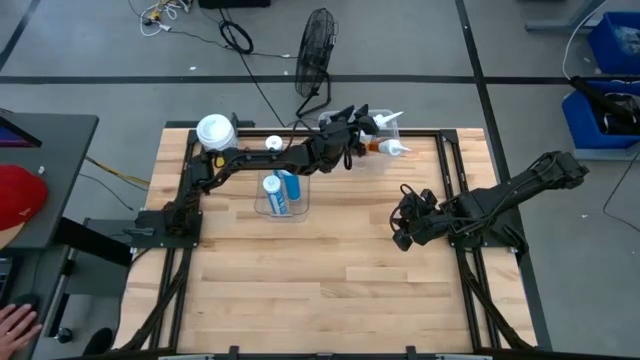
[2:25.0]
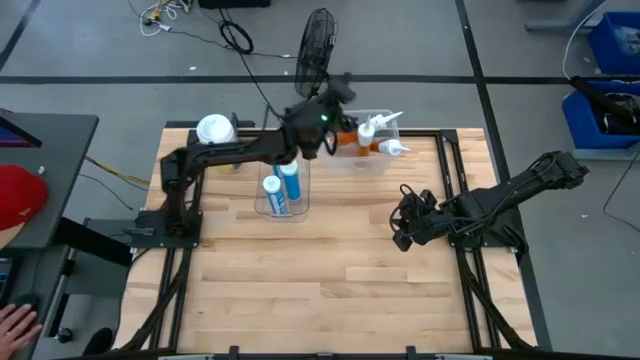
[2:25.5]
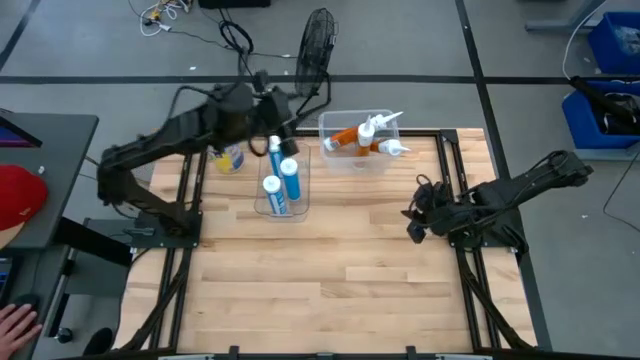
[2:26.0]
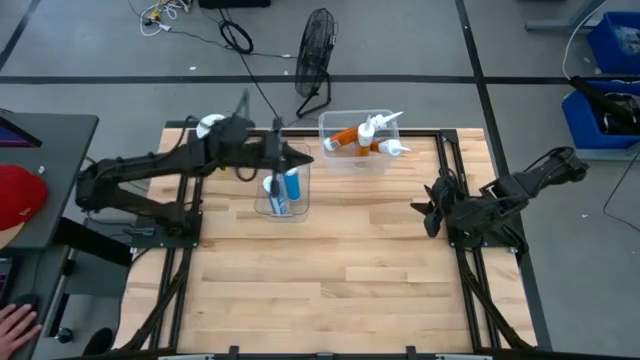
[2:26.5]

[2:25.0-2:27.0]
Task: Pick & place silicon tubes, Sealant and Lysol wipes
Return to Home Position

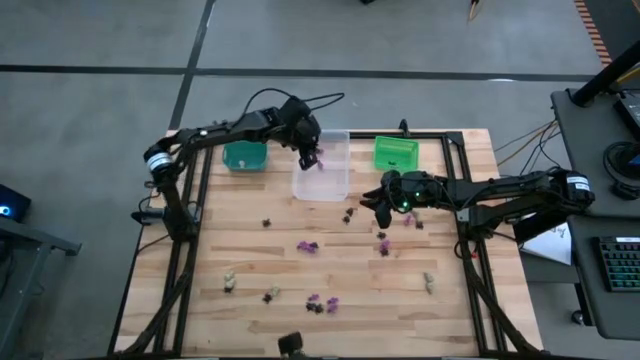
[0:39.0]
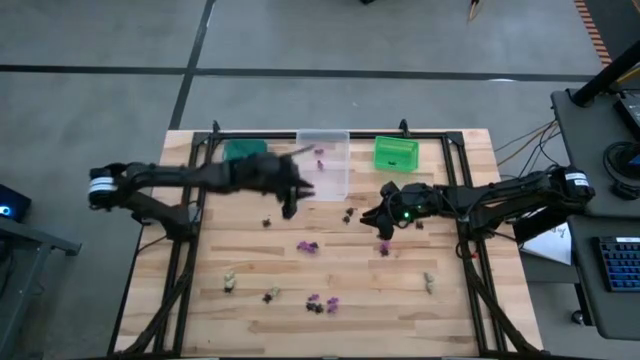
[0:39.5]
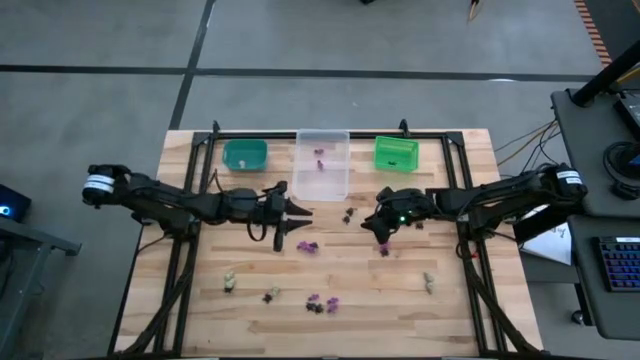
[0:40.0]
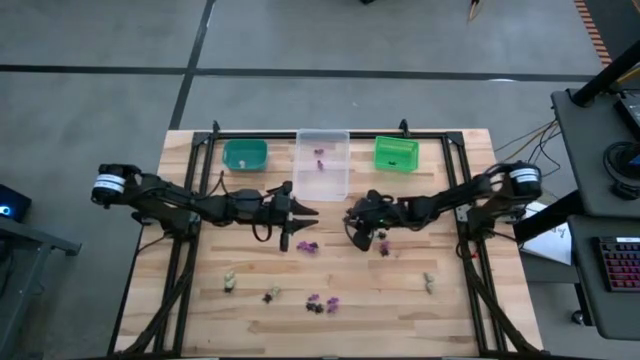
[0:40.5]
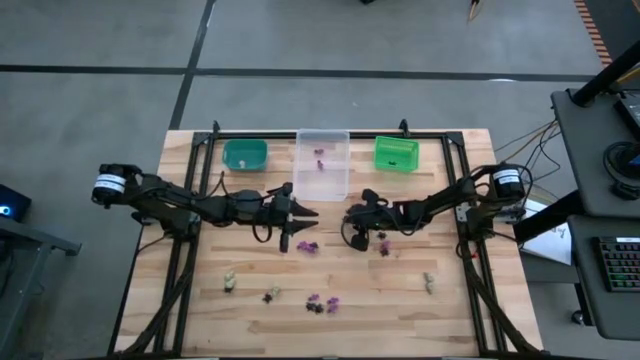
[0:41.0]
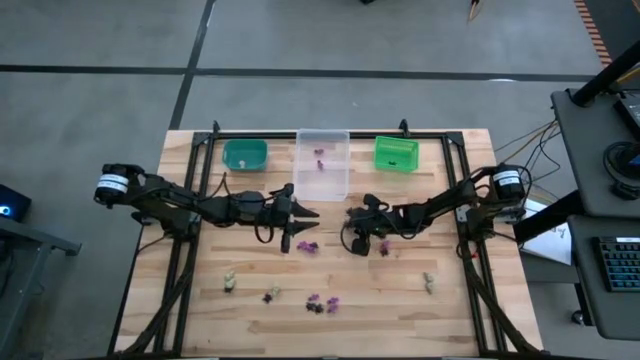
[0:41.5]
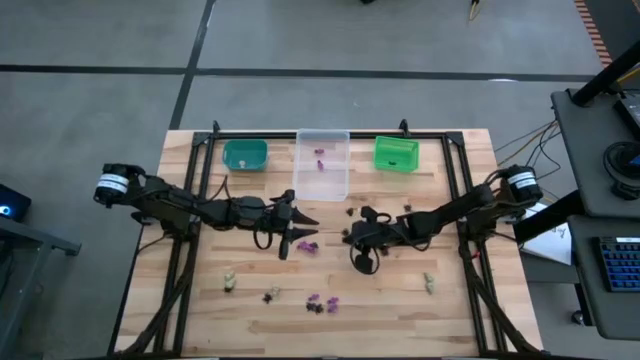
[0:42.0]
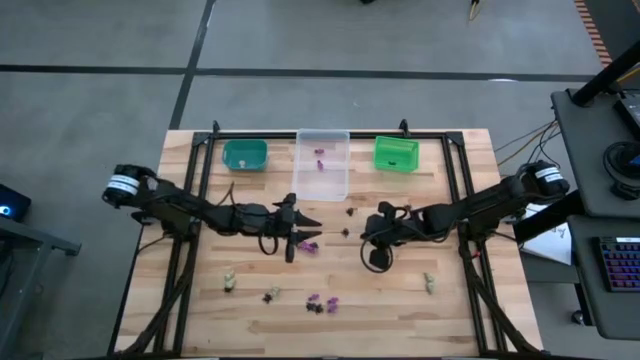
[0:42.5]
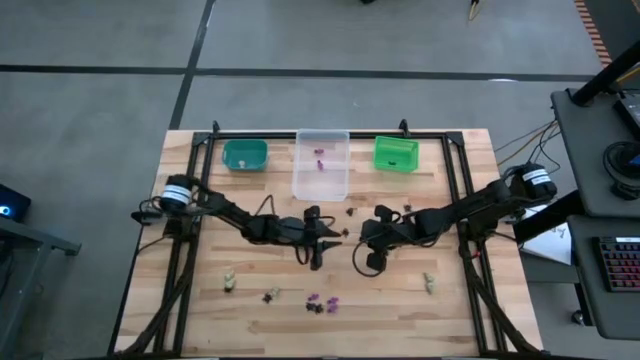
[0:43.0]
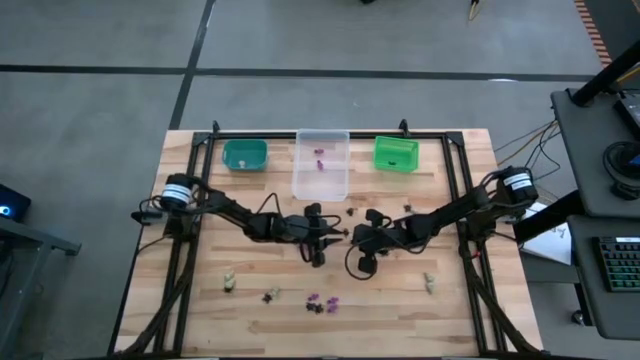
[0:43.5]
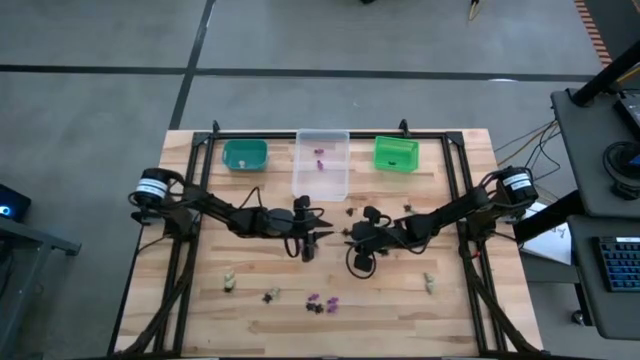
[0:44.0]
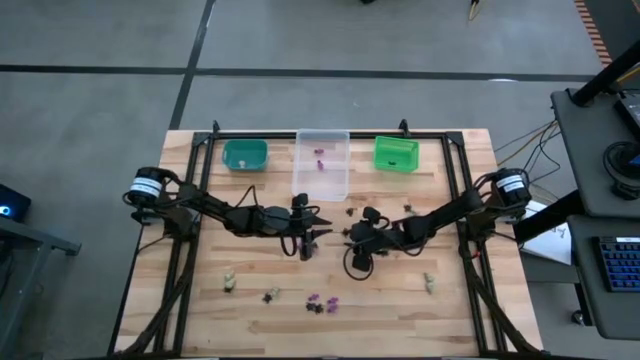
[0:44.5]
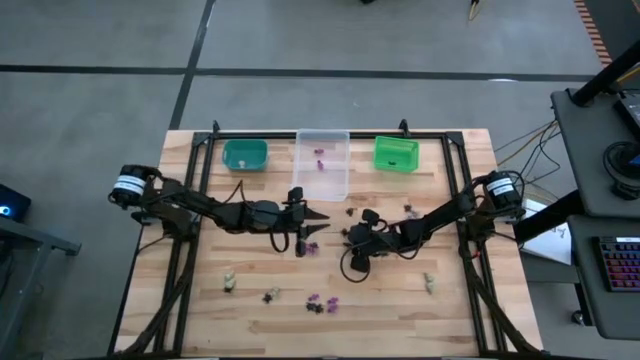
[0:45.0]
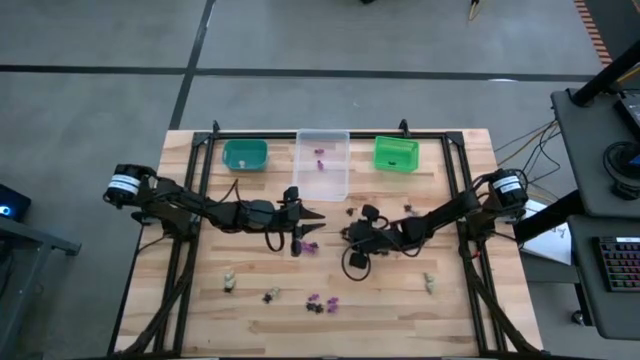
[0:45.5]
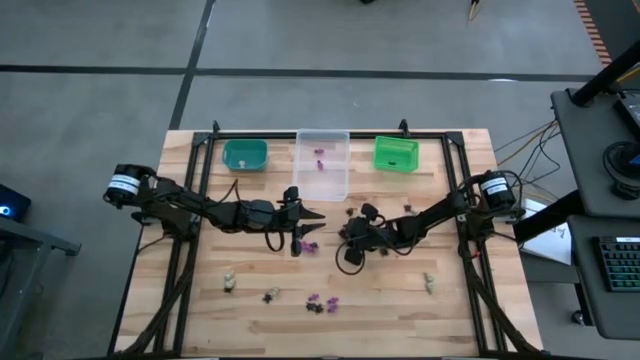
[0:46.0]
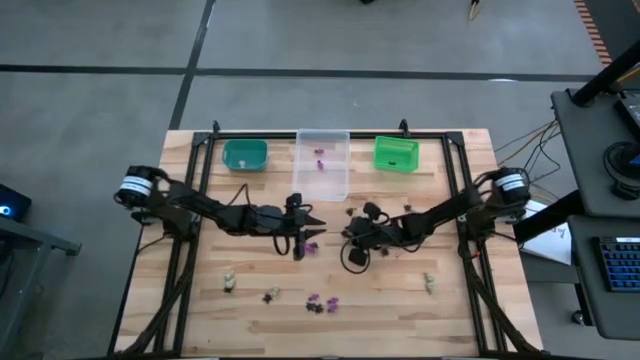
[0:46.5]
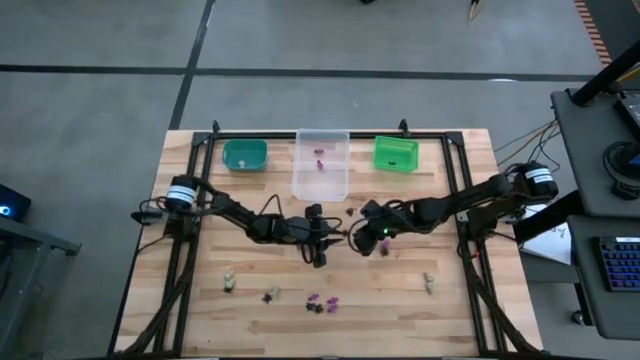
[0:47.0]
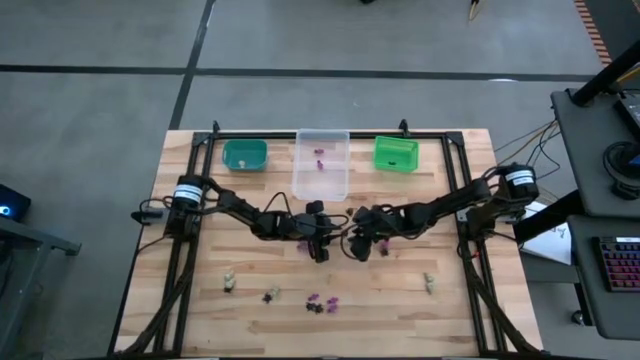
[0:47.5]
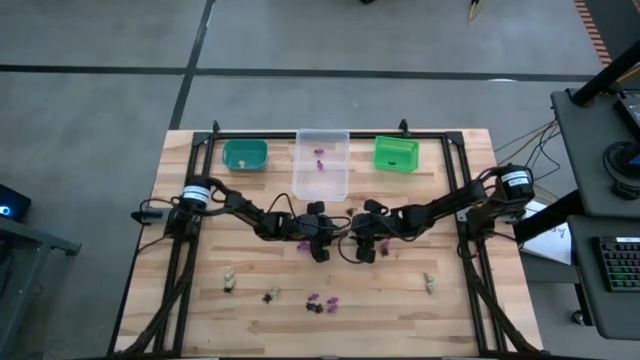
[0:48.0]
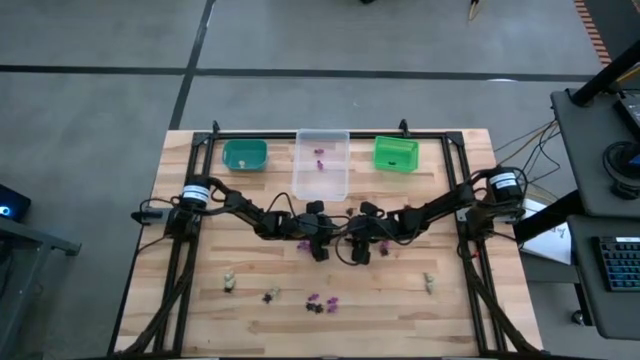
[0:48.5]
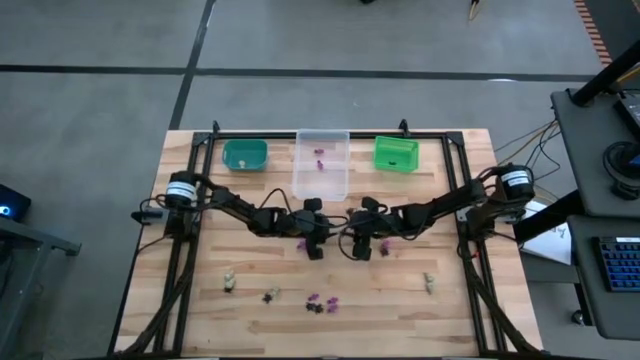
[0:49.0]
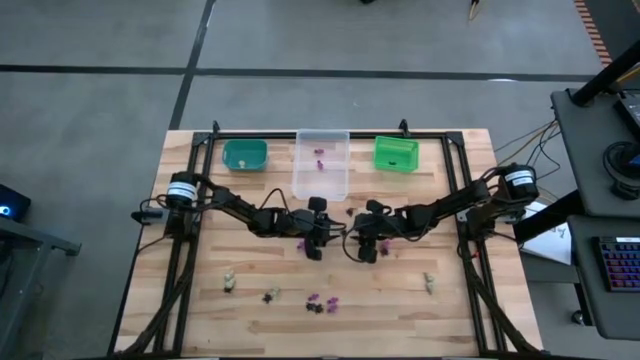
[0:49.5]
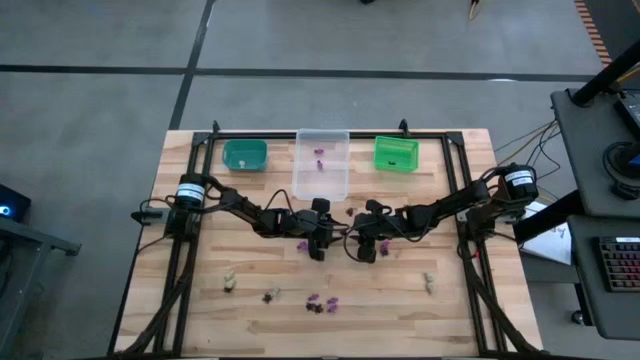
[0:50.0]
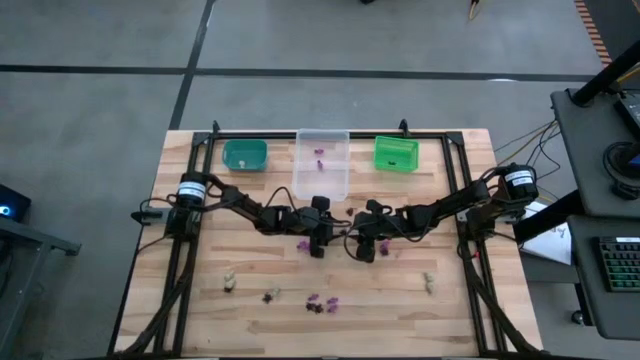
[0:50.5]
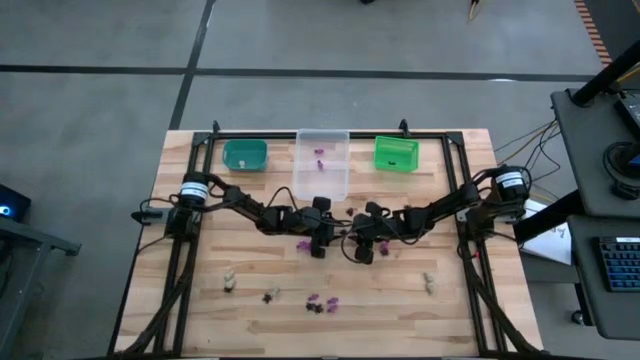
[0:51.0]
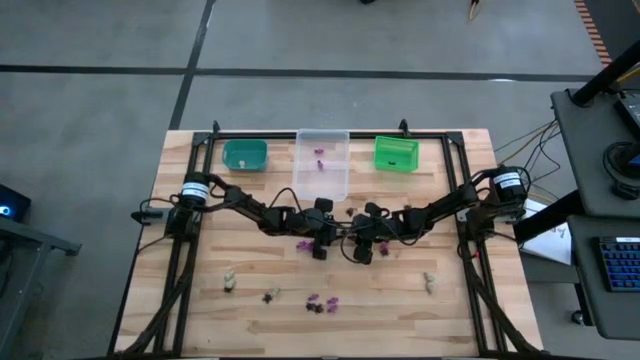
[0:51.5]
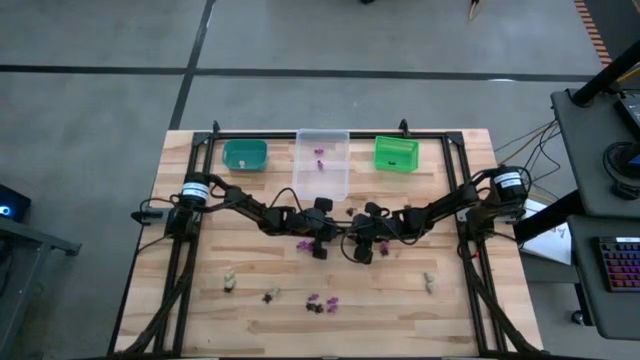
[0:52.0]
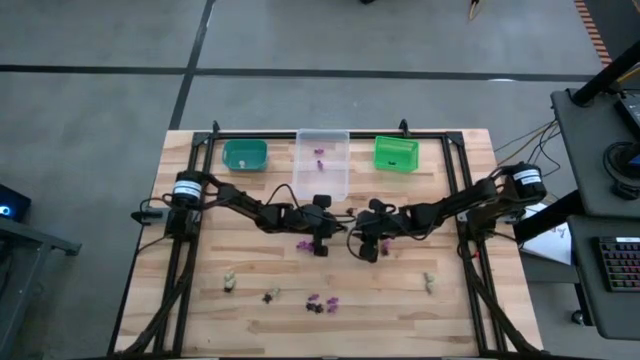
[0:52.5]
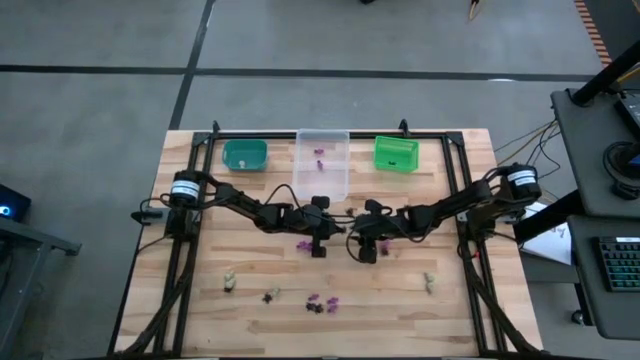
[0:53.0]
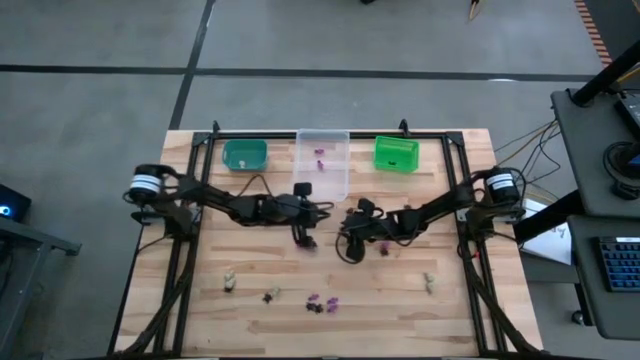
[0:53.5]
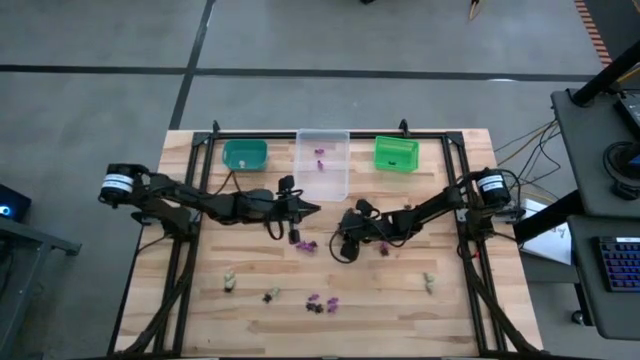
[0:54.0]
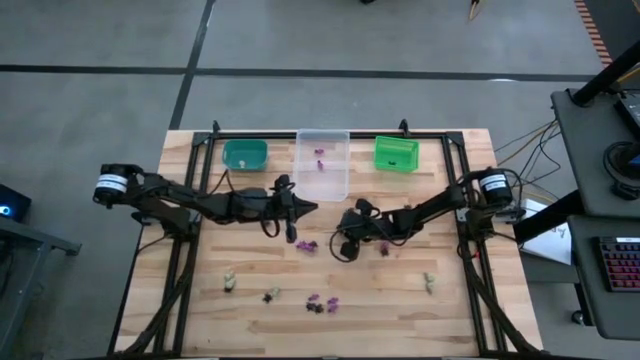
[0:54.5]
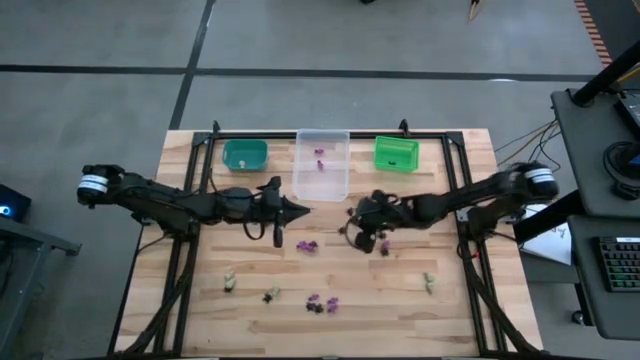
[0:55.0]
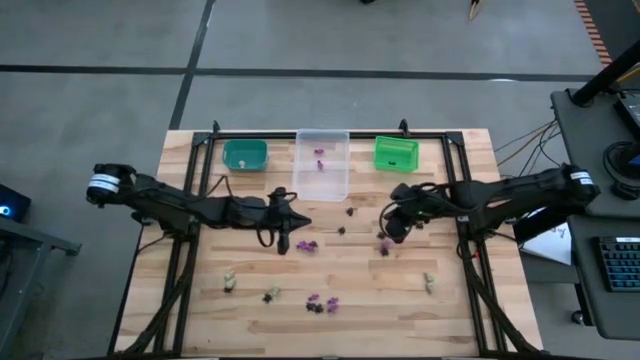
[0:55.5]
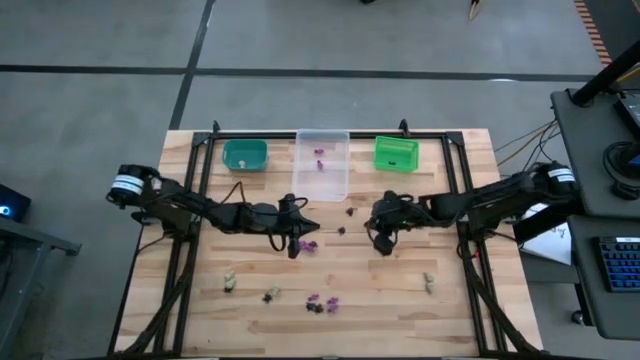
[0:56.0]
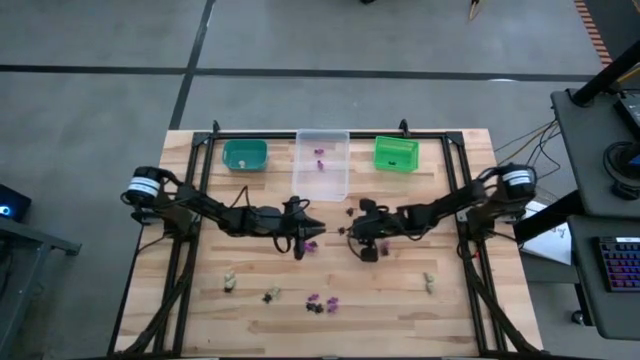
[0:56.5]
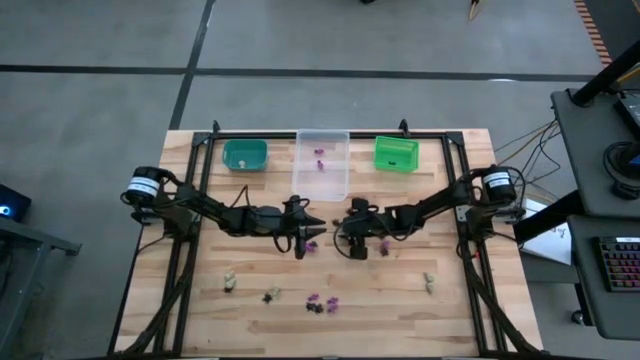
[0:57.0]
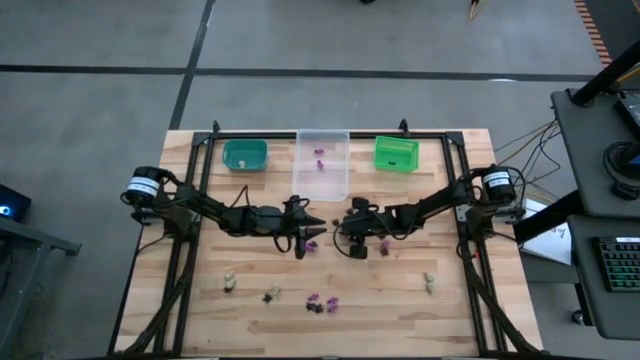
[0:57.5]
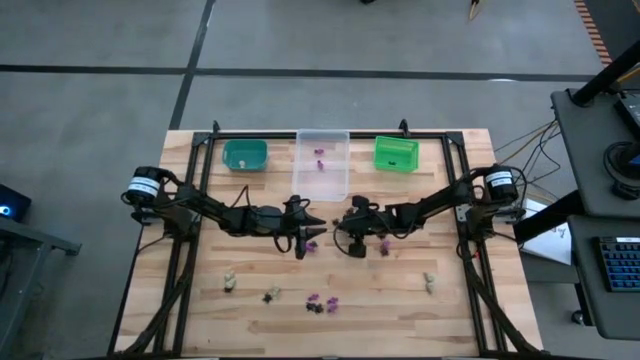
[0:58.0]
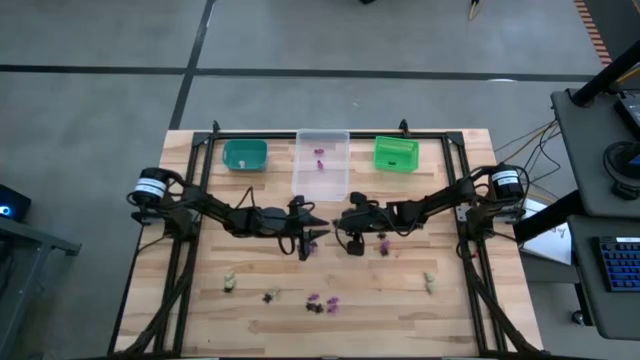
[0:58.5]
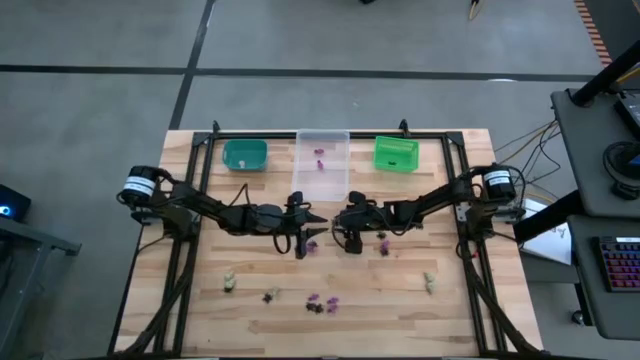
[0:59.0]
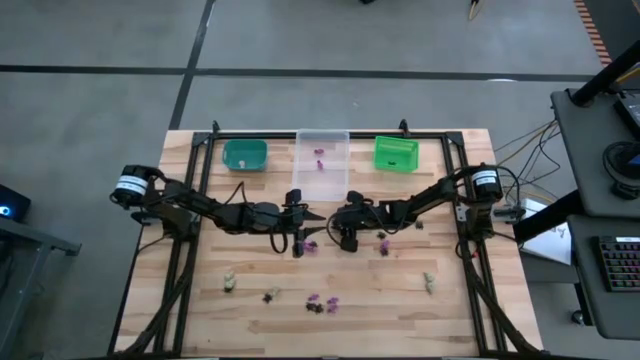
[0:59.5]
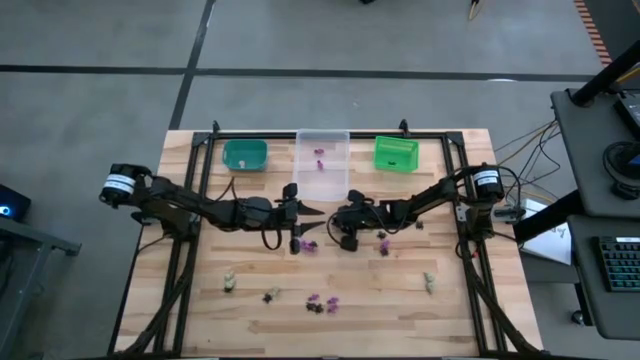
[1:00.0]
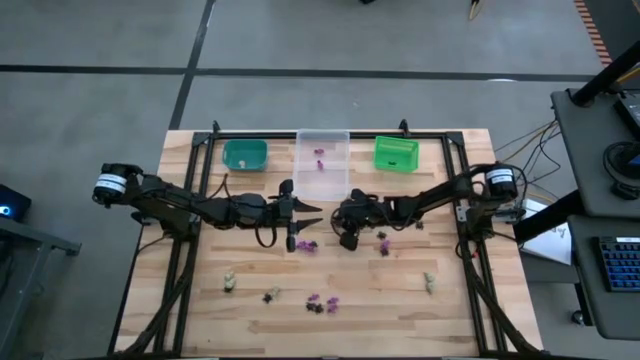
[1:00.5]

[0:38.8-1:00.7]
Task: Sort Halloween decoration
Put the black spider toy into the green bin
